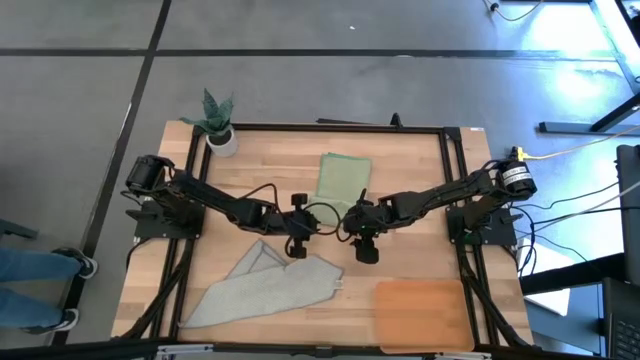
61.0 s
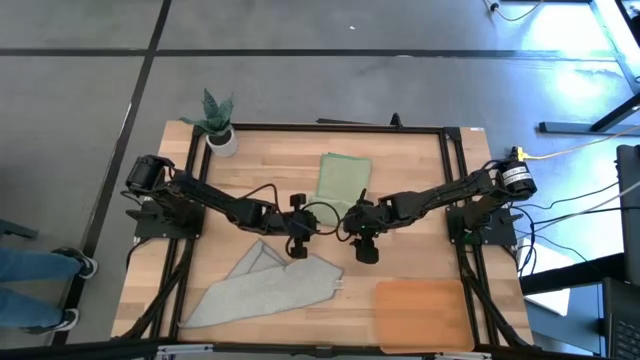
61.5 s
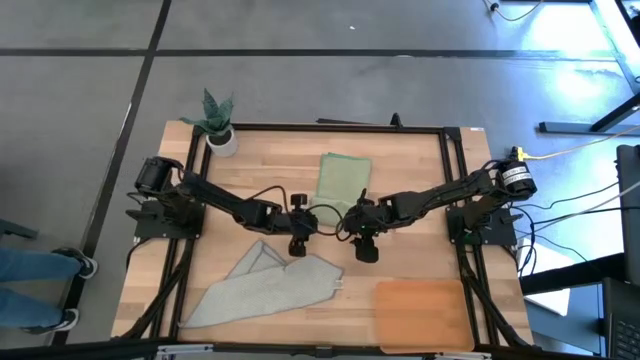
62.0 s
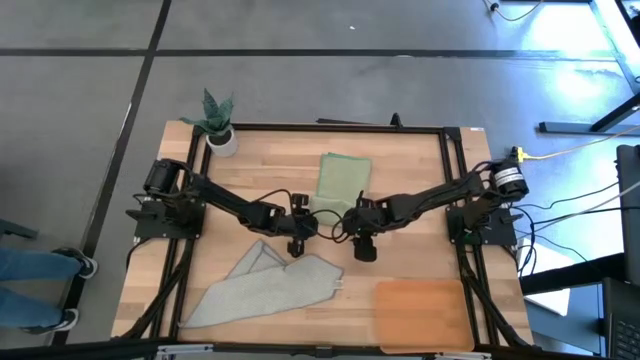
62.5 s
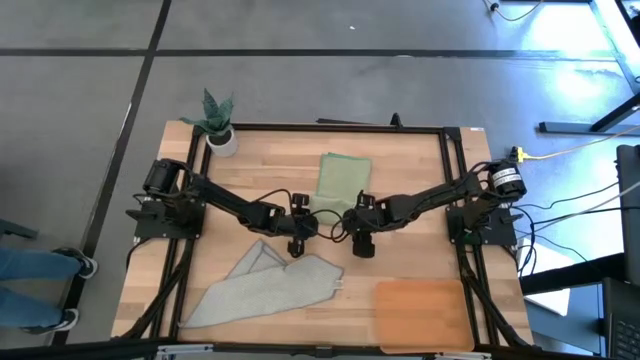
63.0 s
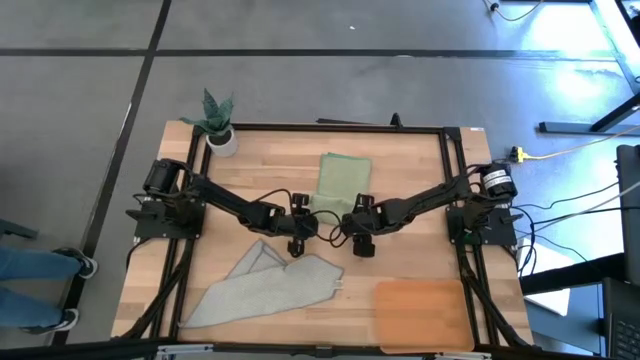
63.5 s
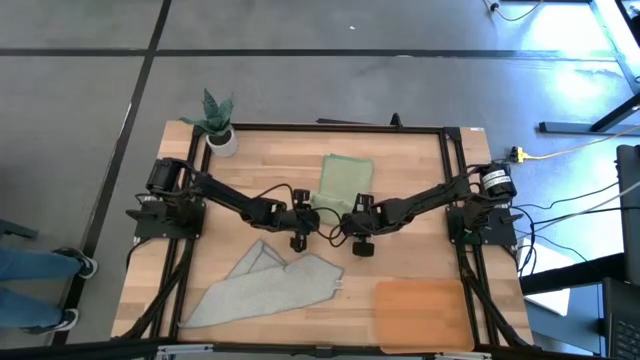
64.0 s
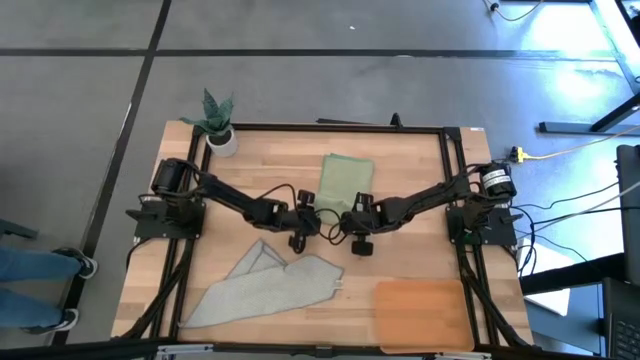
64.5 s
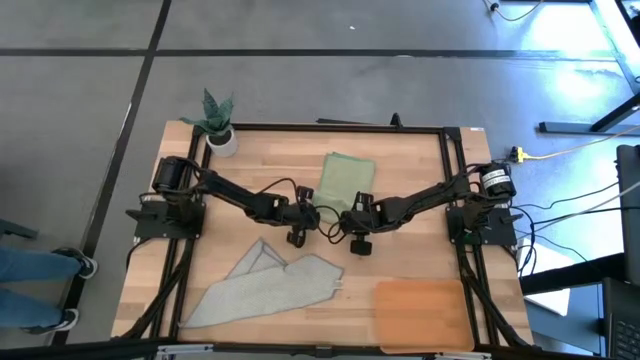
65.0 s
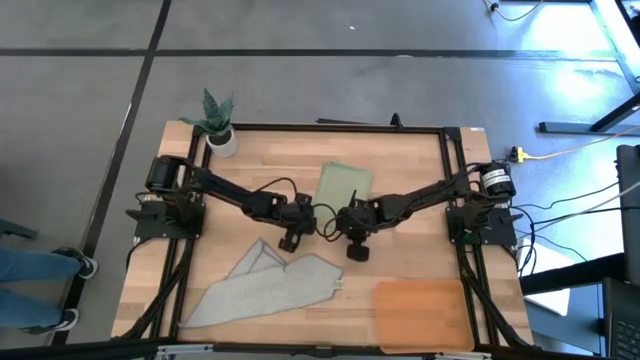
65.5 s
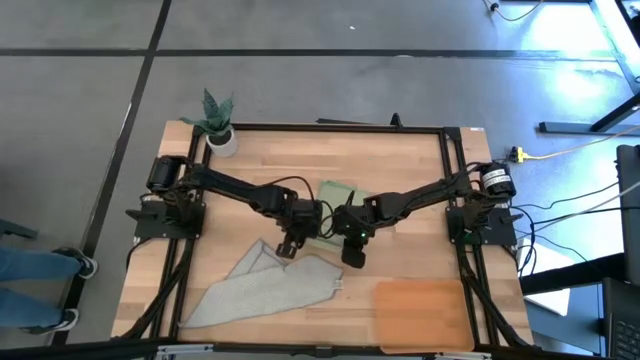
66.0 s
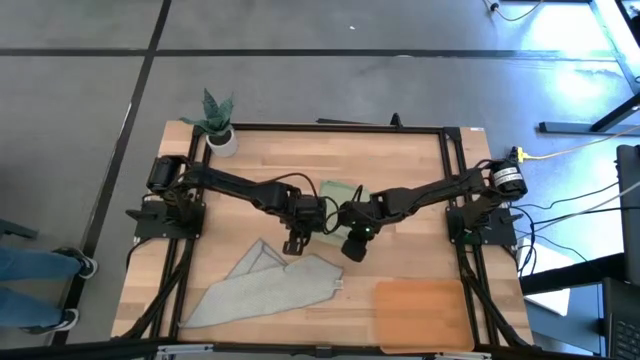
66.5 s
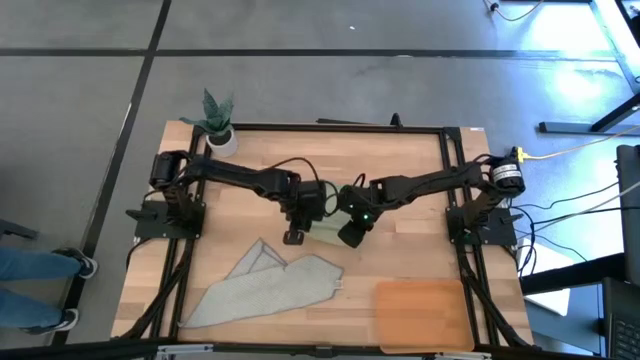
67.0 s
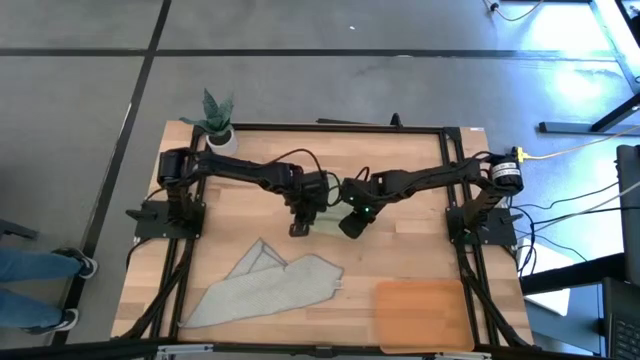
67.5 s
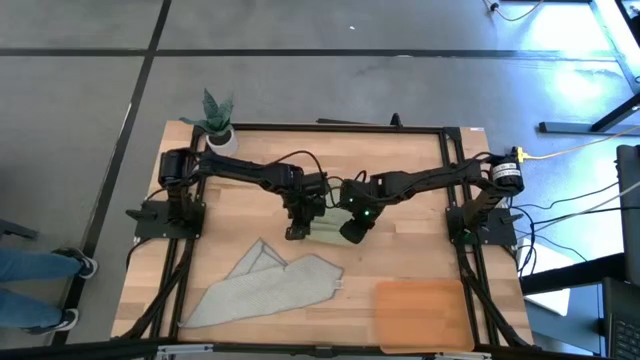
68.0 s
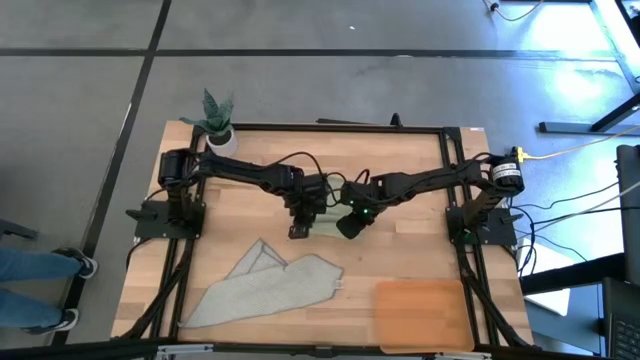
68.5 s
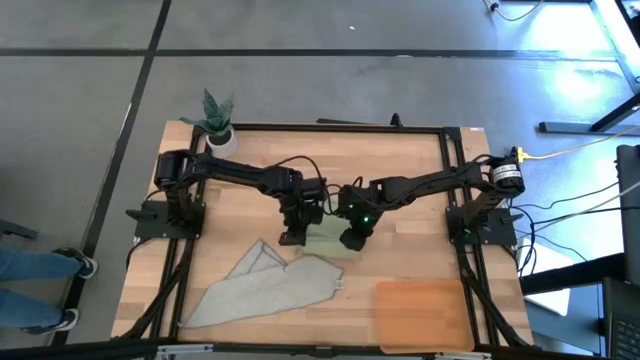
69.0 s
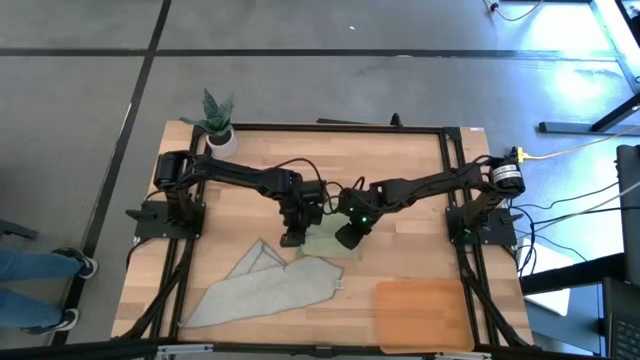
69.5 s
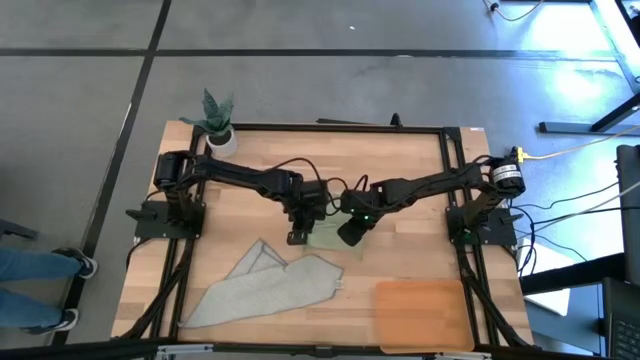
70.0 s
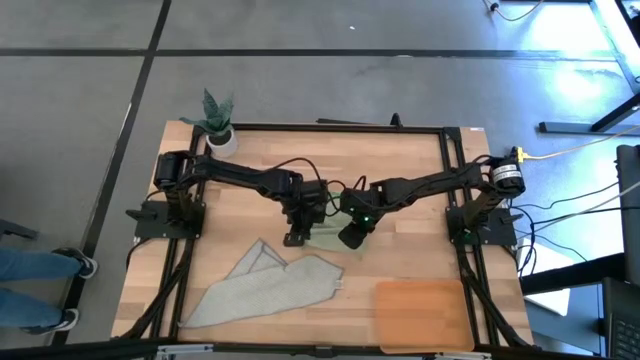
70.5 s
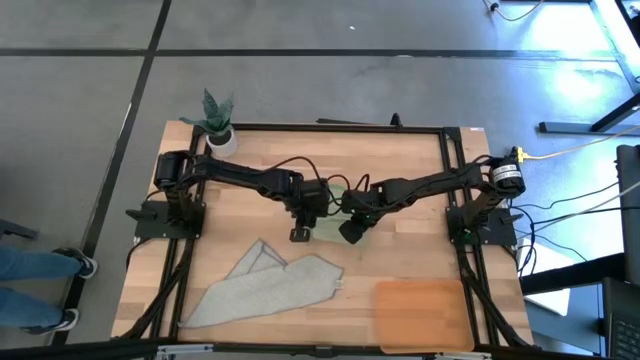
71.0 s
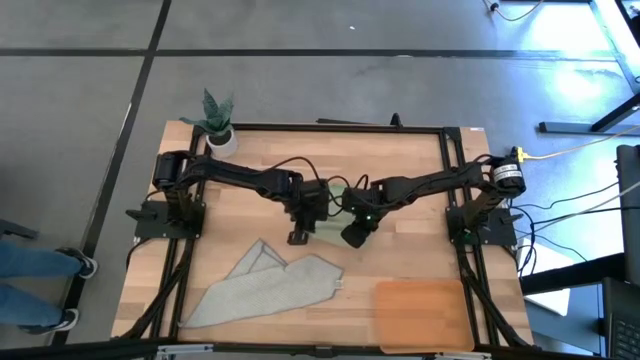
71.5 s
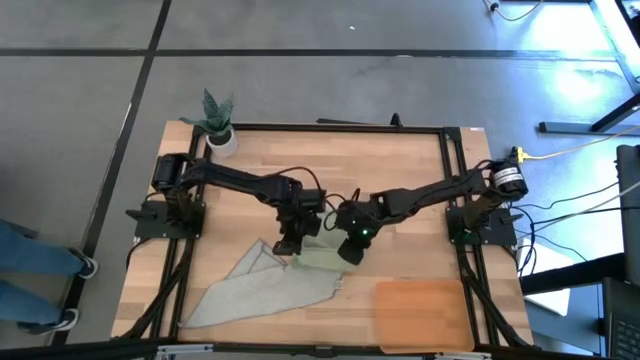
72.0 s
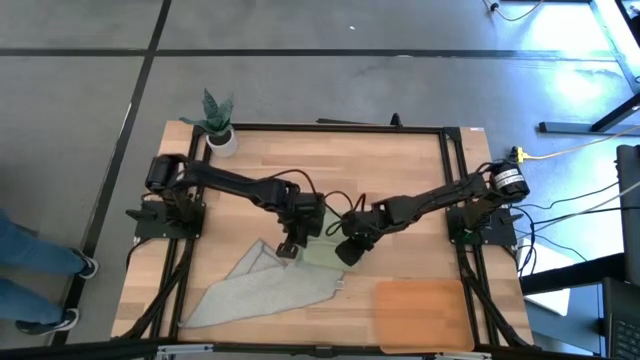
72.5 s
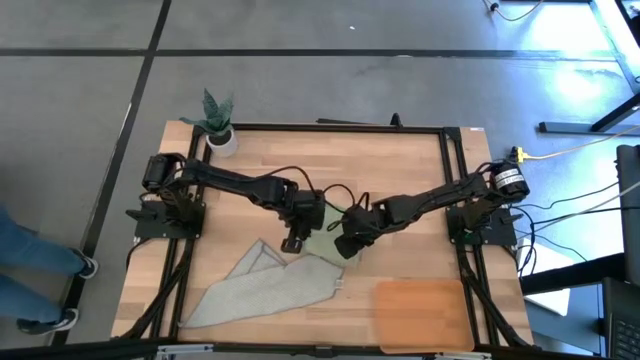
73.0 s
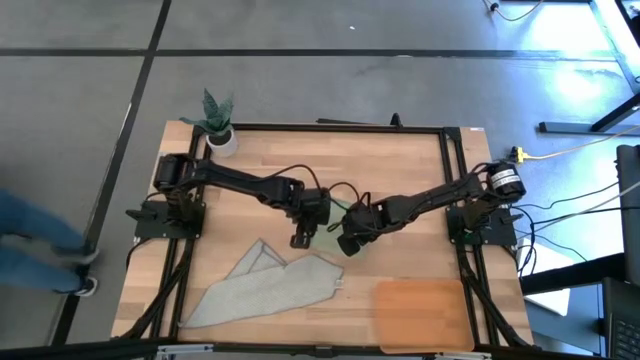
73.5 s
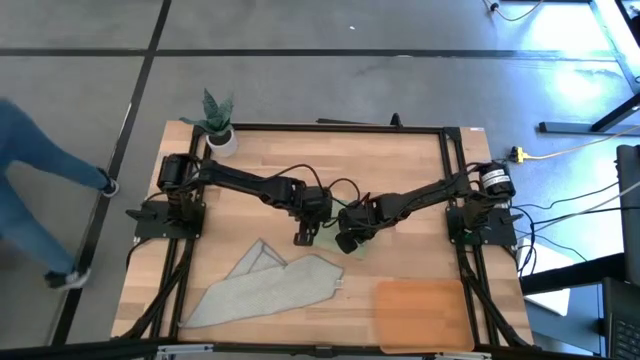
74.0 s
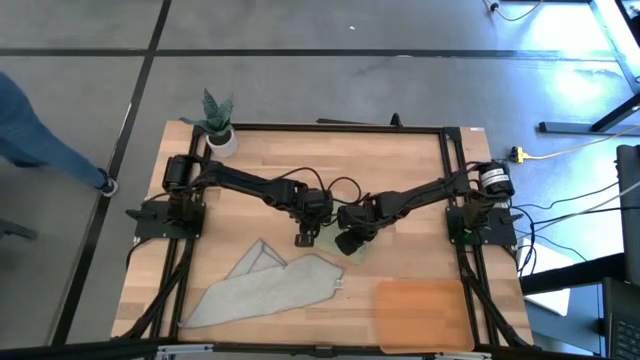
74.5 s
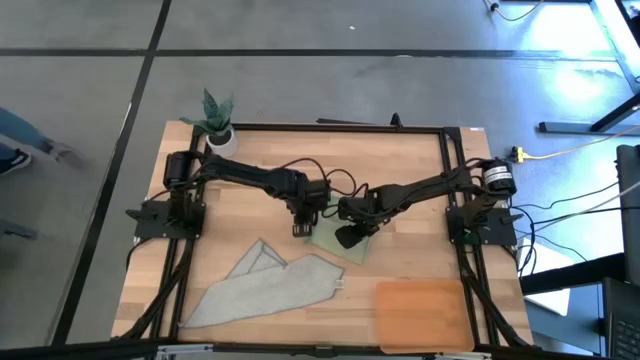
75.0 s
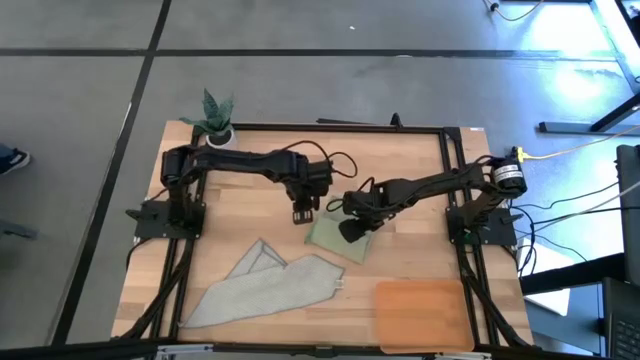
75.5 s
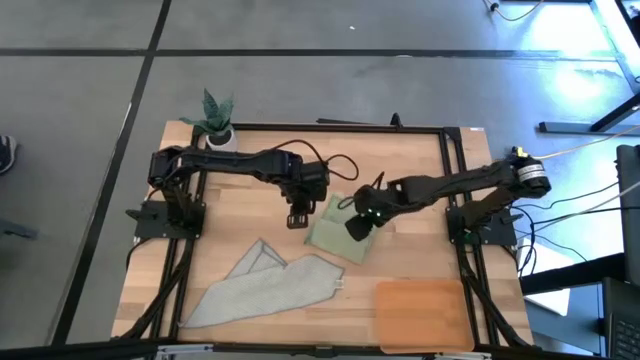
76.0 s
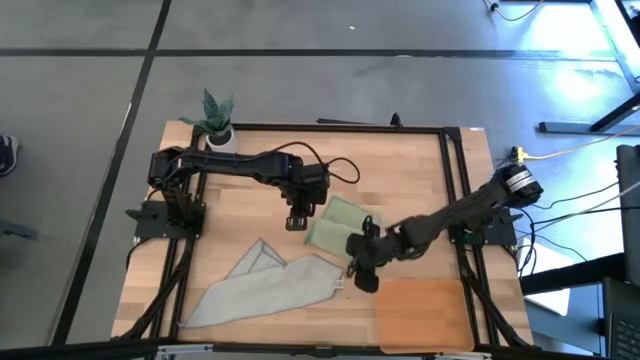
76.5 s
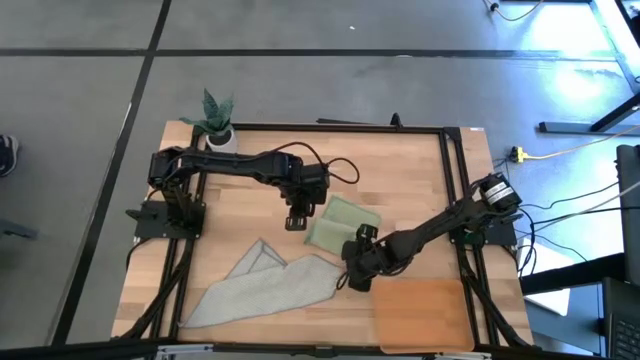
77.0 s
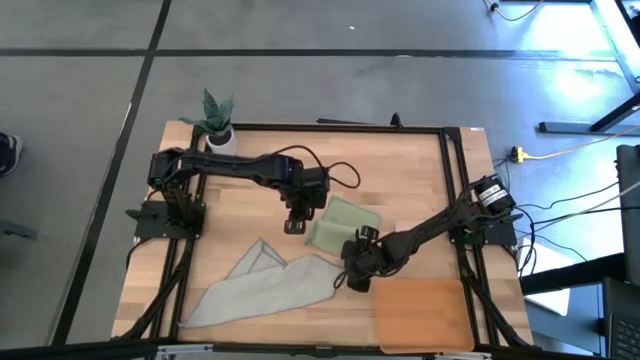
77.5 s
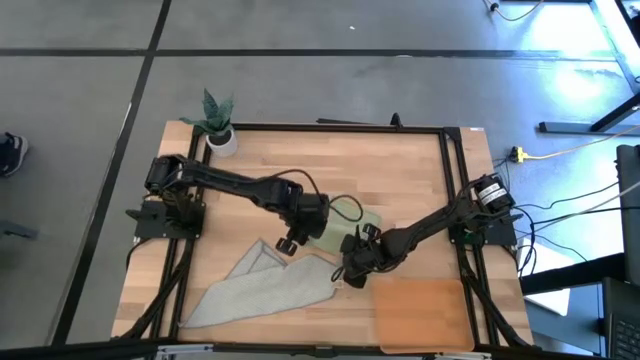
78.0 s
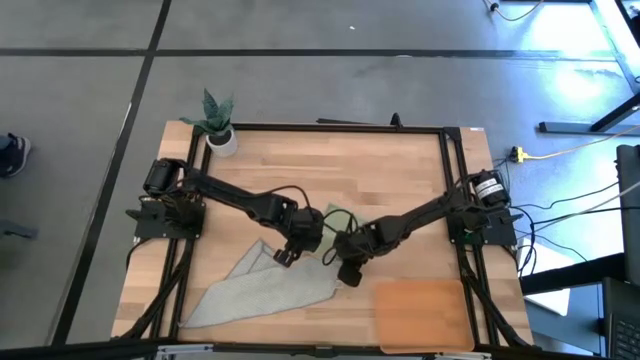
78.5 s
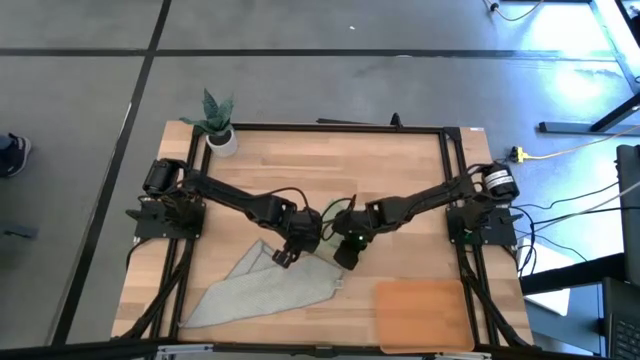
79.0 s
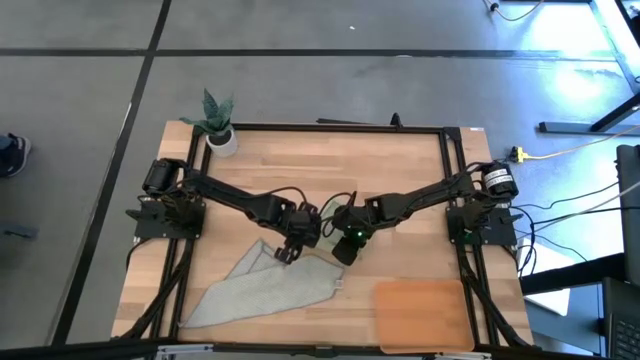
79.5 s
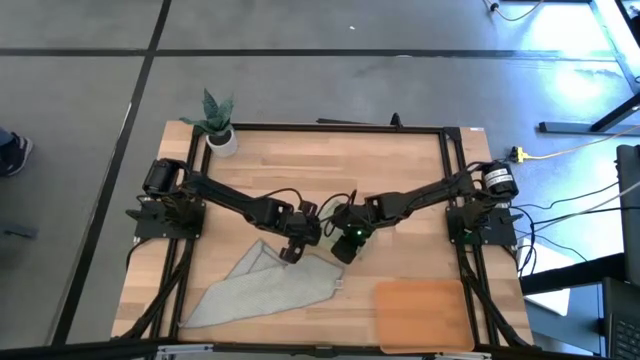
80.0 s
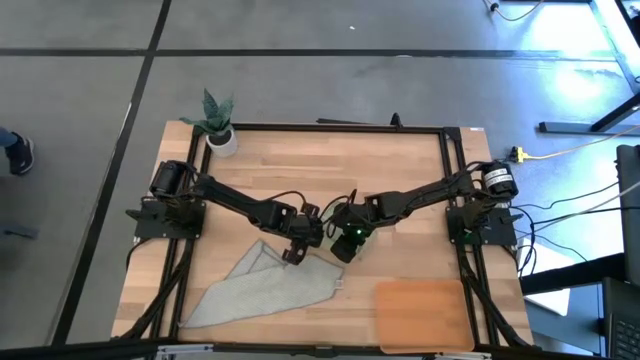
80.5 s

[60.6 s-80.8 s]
Task: Roll microfiber towels into tight, uniform cylinder then place into a basket
Roll the green microfiber towel
